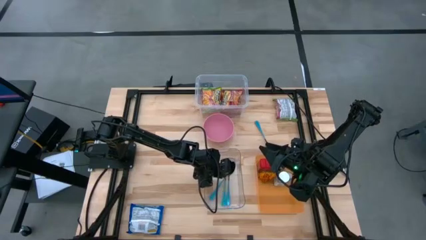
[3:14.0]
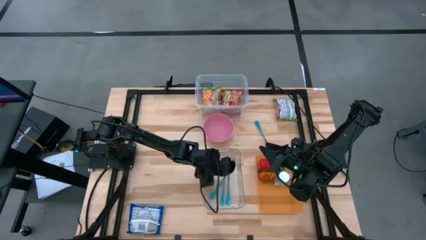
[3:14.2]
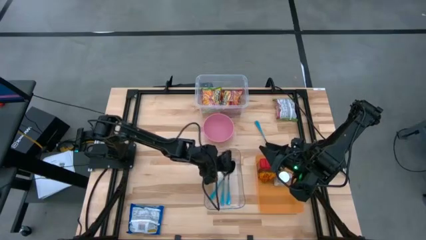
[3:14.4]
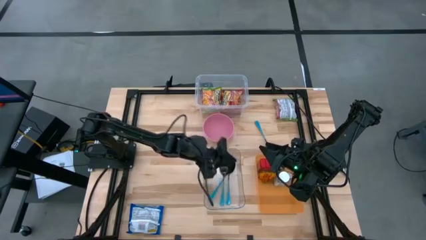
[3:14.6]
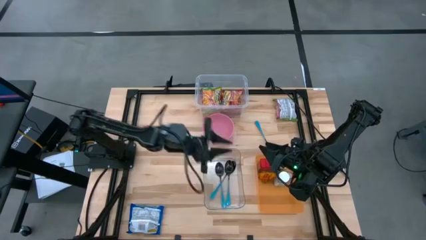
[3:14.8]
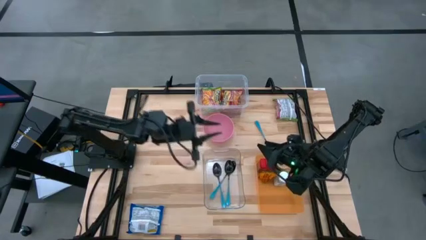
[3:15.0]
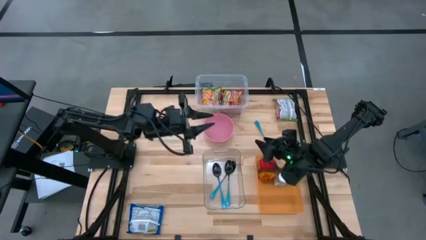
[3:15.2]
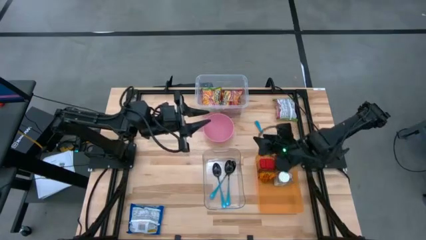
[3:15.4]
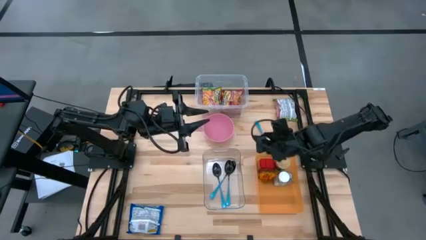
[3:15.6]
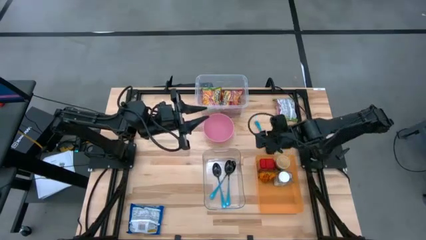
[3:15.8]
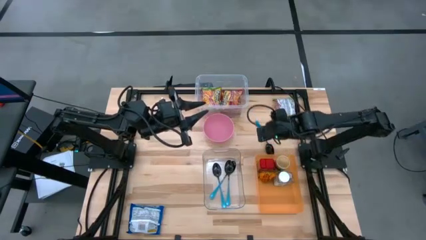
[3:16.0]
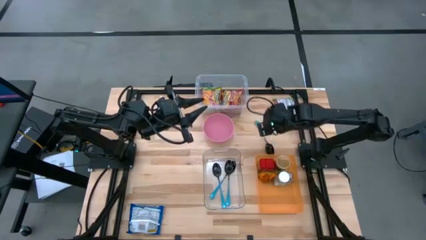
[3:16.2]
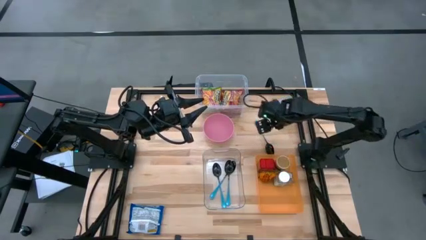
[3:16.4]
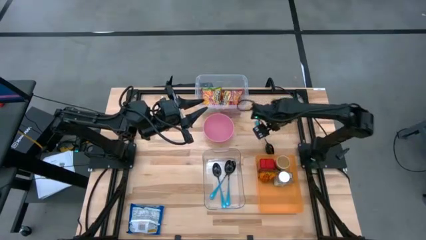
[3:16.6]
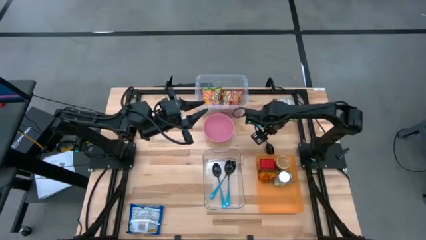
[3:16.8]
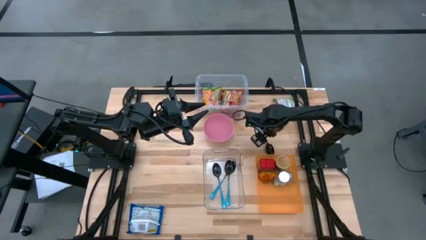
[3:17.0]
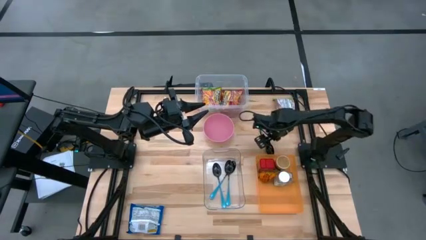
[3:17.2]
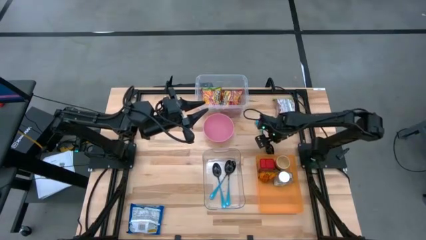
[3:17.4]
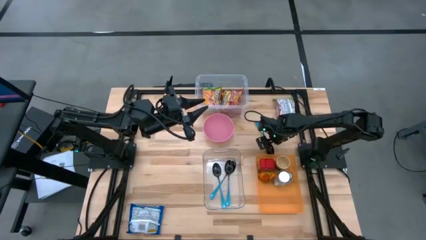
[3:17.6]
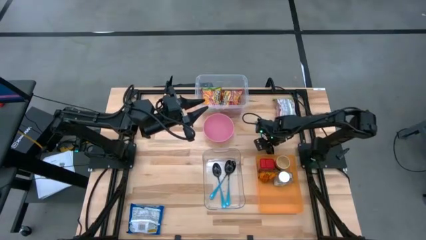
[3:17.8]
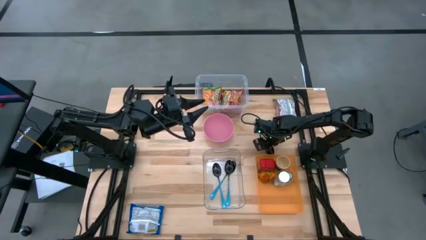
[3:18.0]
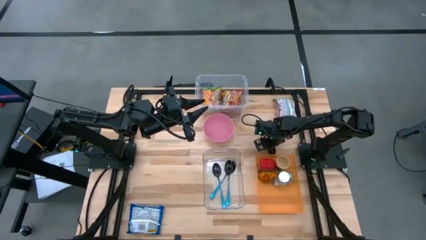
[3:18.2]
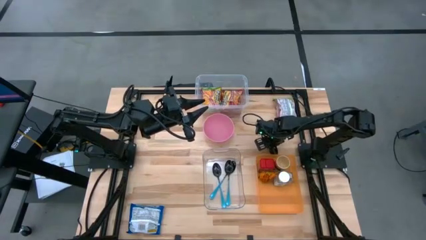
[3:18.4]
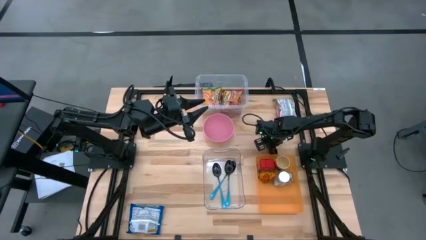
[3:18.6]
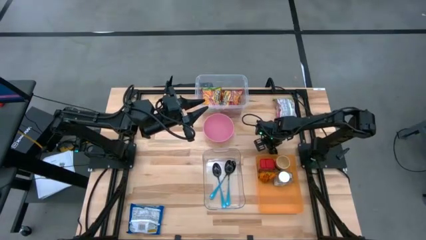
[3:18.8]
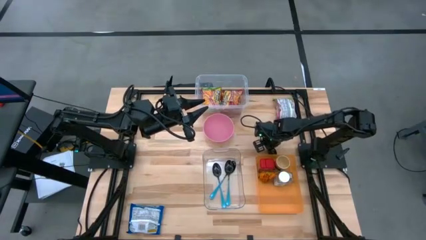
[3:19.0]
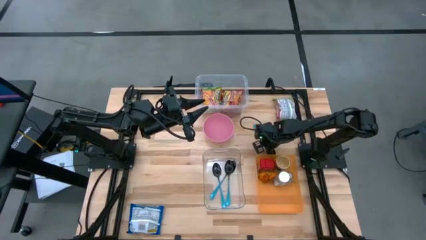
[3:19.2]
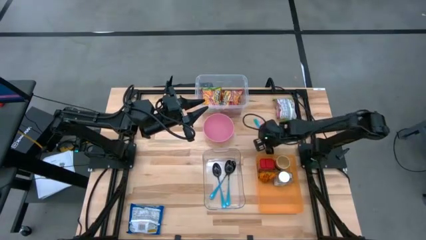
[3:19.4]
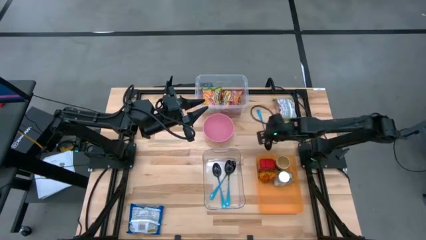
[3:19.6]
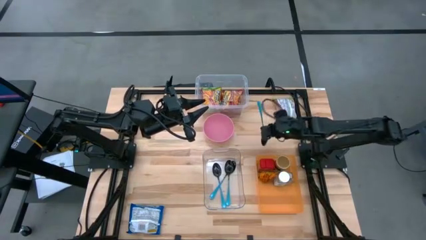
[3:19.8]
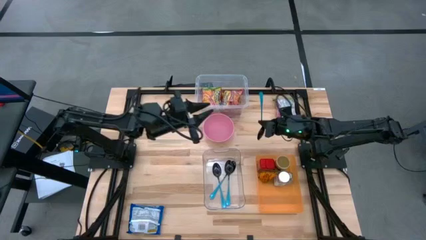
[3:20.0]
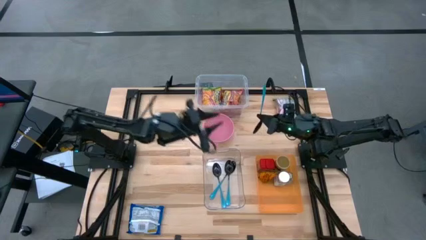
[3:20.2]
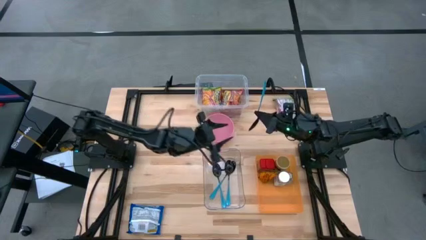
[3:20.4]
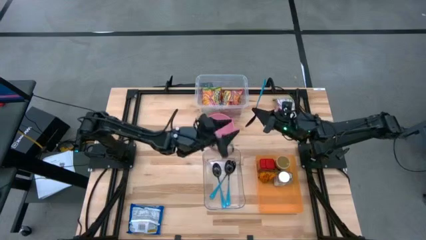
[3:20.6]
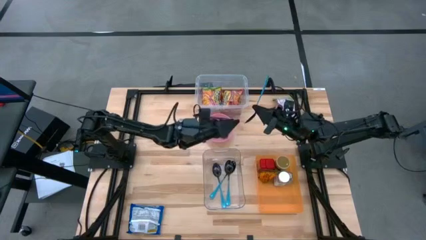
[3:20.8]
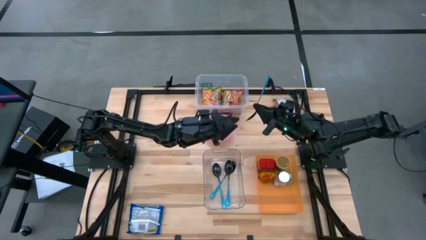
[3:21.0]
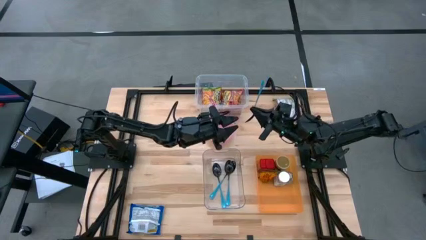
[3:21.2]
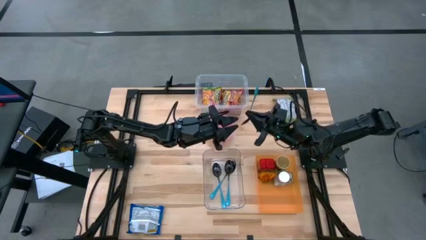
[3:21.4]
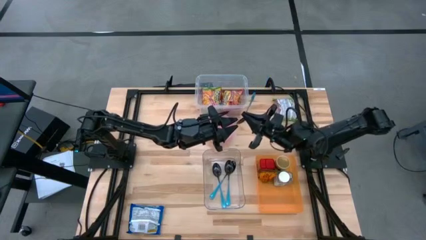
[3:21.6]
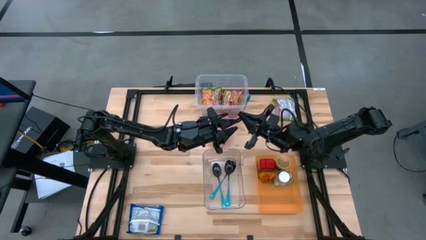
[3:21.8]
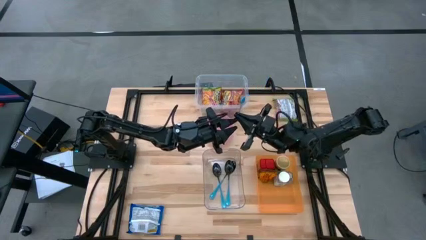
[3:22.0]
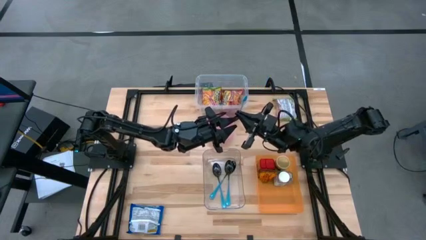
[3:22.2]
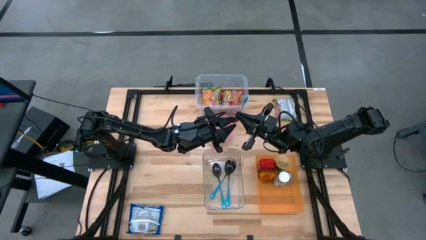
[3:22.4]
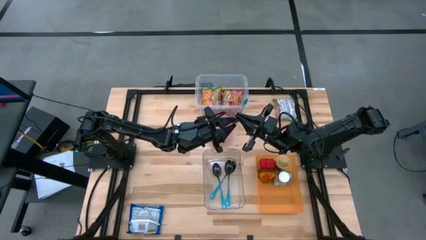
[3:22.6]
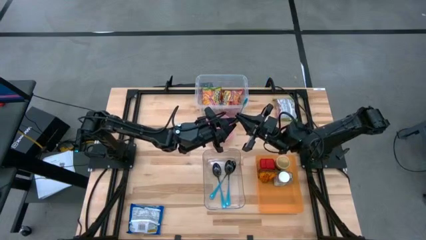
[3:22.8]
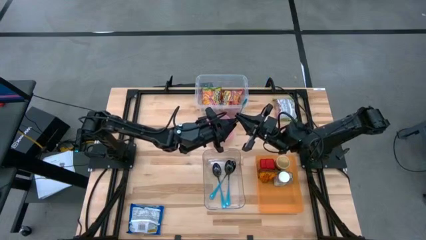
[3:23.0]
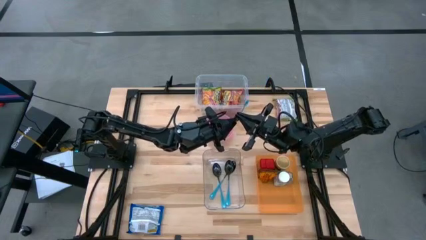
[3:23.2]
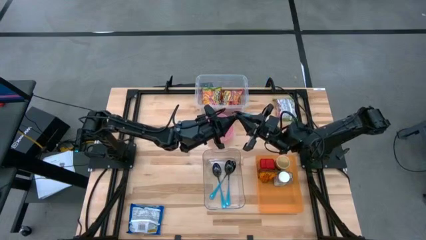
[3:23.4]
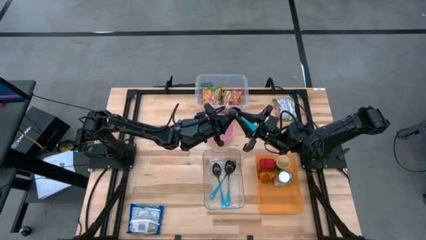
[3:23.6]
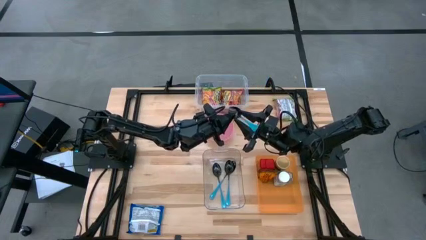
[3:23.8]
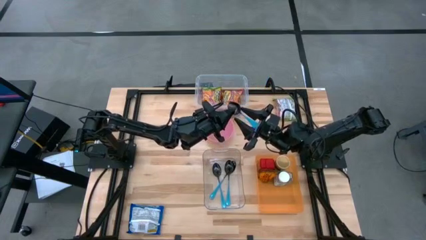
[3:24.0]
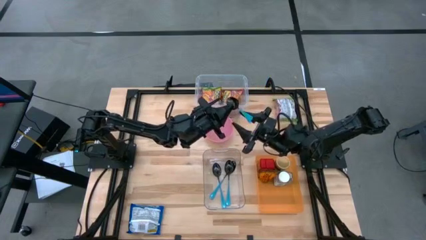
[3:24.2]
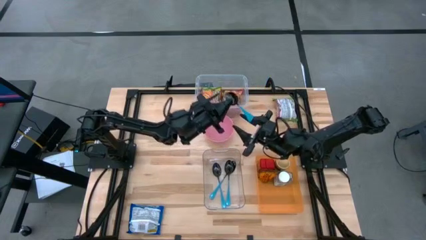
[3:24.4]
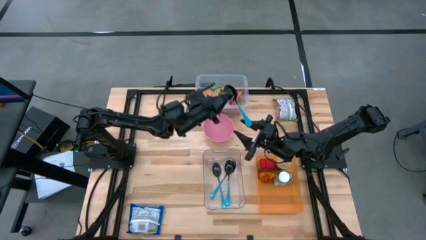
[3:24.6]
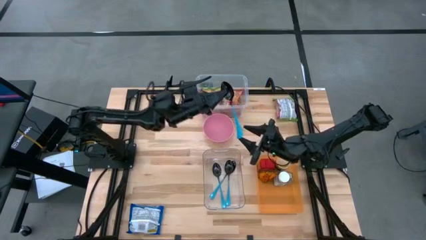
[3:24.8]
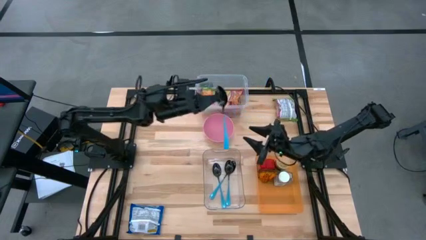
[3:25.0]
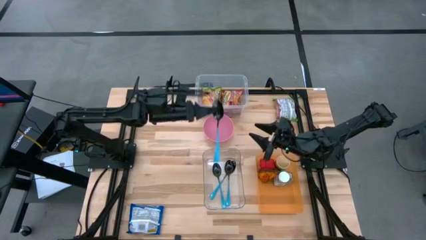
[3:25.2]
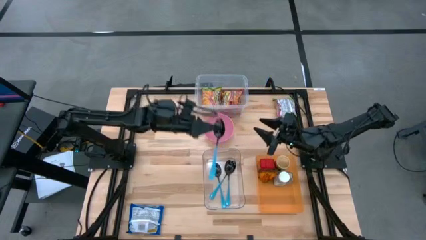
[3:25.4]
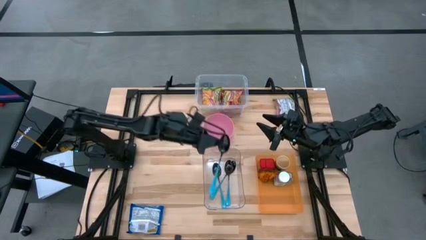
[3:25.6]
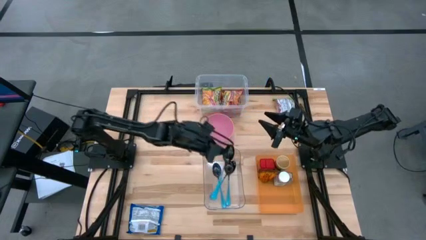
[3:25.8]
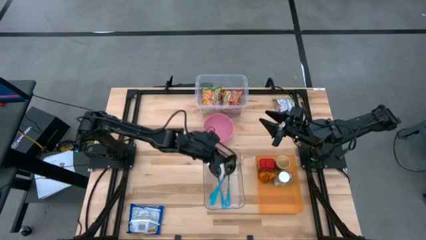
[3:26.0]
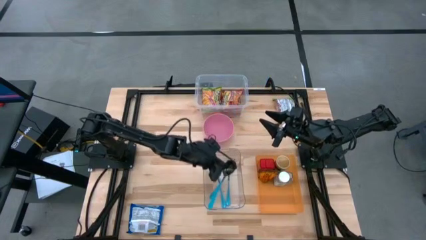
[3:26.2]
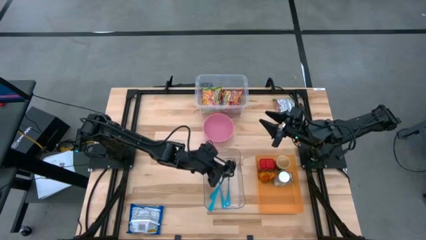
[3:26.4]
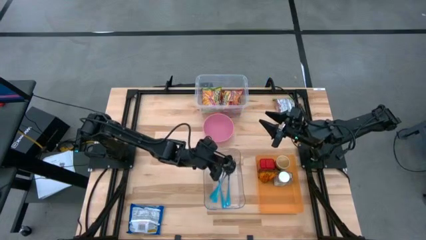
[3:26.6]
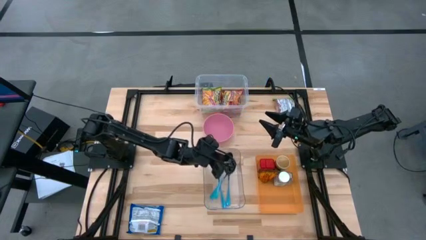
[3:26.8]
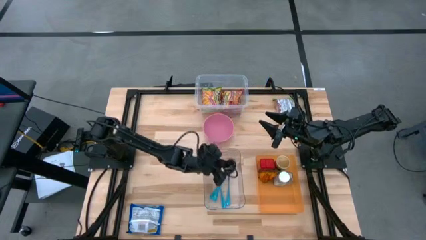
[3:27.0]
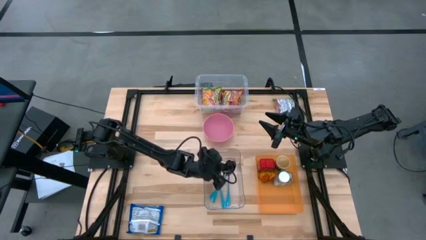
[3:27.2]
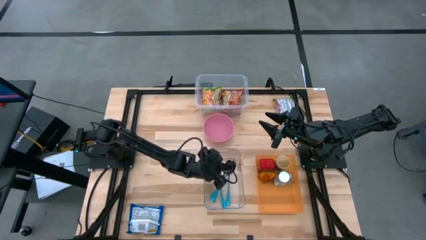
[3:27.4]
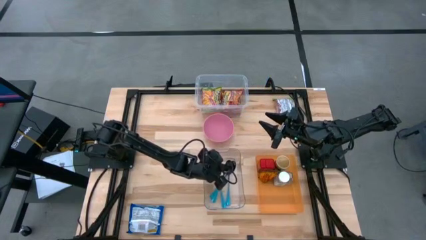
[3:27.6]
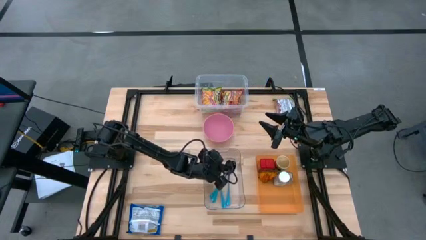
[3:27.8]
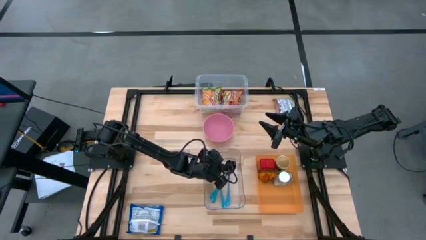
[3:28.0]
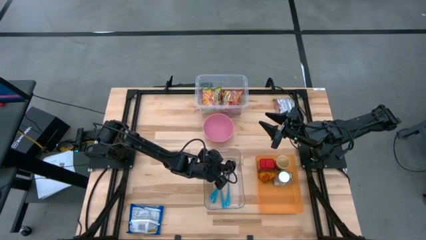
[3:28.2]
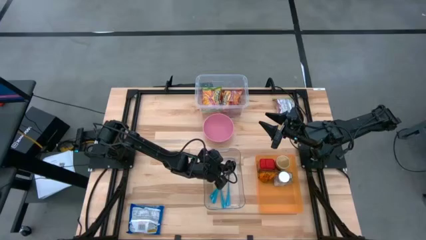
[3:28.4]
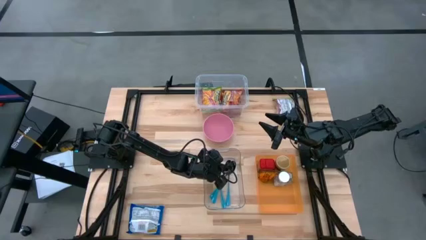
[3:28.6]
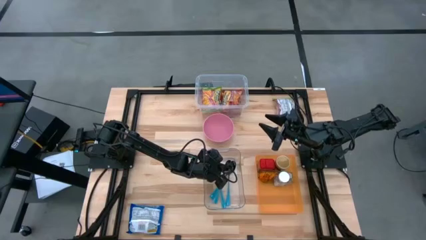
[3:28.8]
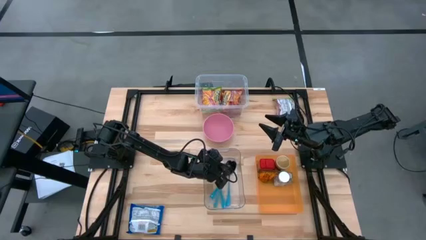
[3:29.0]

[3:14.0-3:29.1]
Task: Pick & Place Food Item
Put the blue spoon into the bottom transparent bin

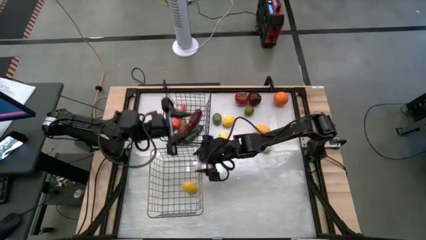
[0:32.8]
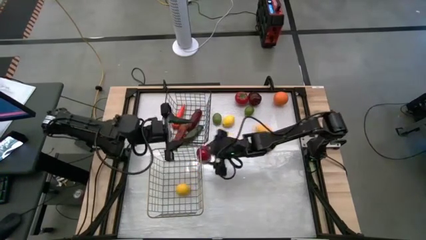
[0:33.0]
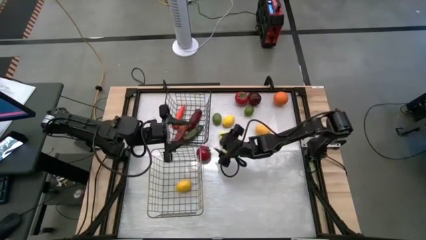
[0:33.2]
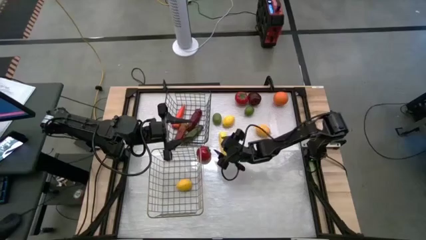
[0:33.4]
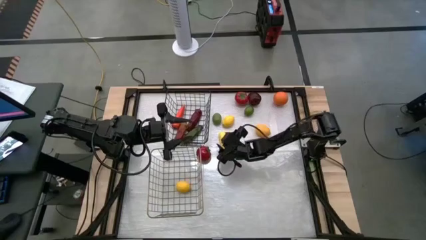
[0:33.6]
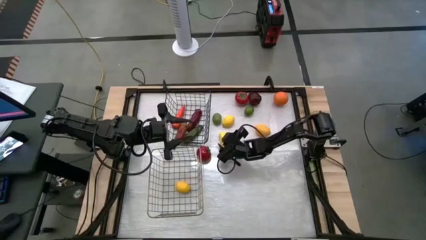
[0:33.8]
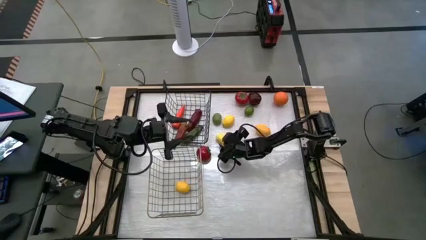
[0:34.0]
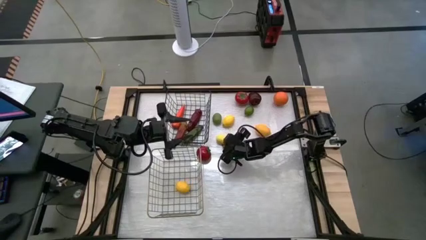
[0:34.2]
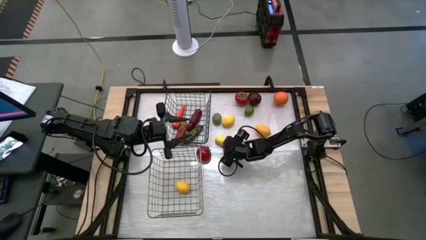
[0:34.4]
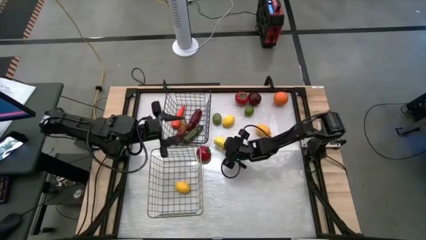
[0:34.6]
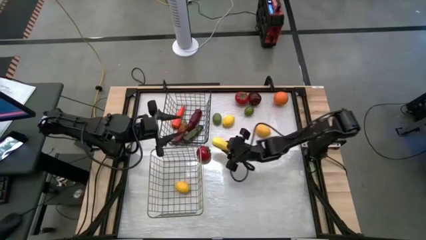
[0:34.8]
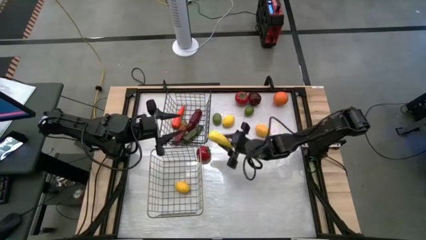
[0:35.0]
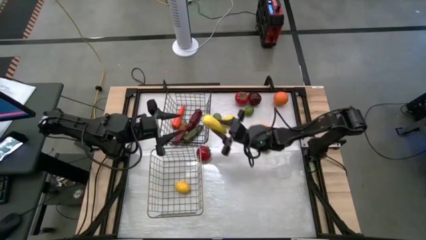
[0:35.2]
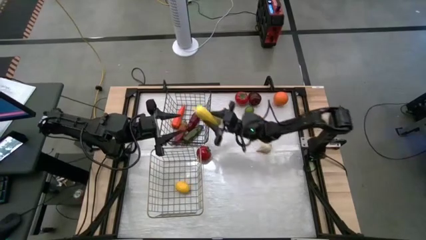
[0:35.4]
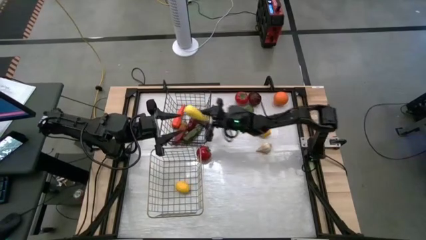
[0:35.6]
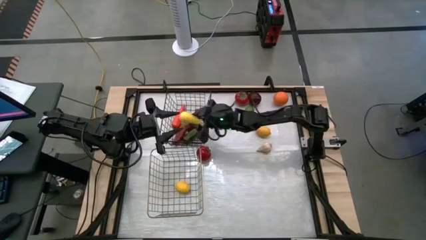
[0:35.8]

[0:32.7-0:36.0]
Task: Sort produce into baskets
Put the yellow corn into the black wire basket
